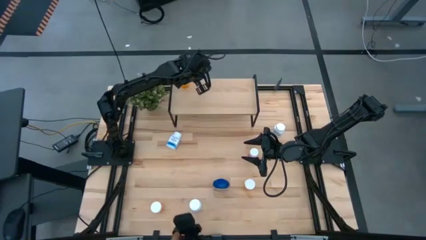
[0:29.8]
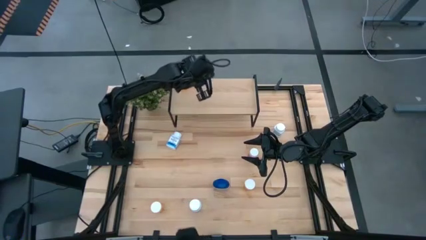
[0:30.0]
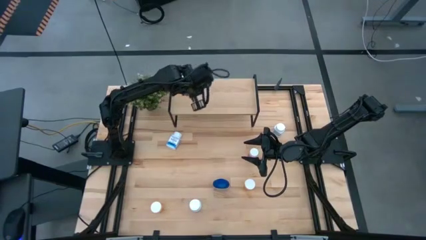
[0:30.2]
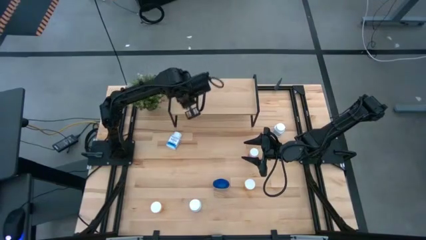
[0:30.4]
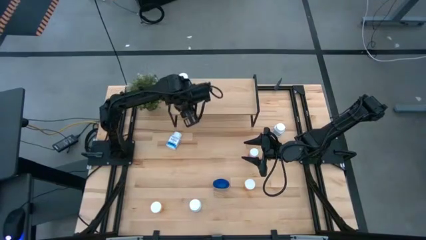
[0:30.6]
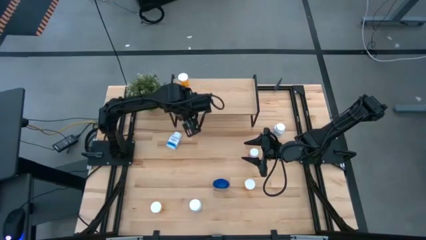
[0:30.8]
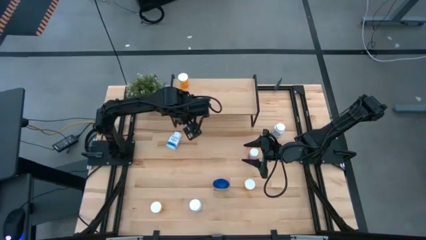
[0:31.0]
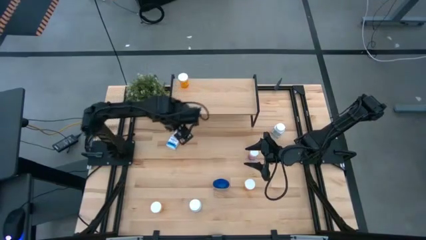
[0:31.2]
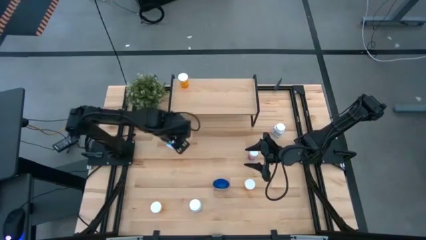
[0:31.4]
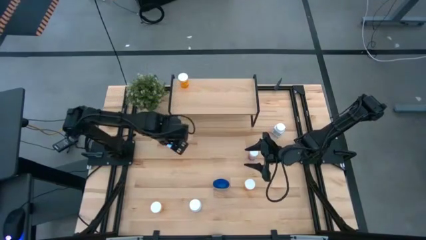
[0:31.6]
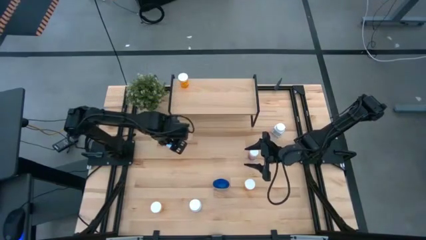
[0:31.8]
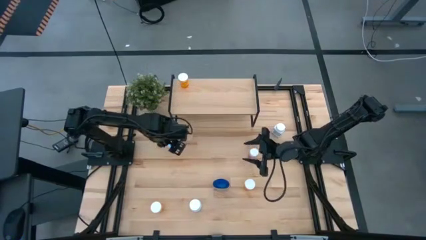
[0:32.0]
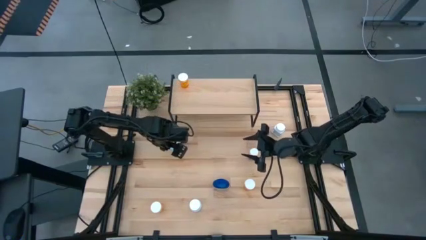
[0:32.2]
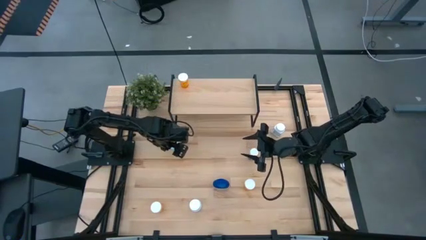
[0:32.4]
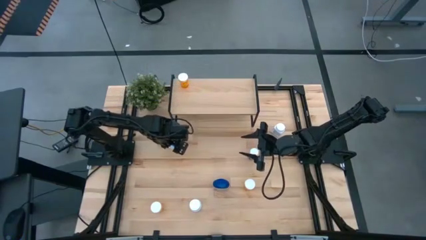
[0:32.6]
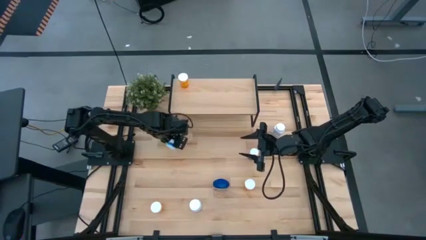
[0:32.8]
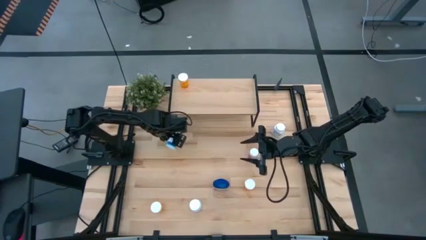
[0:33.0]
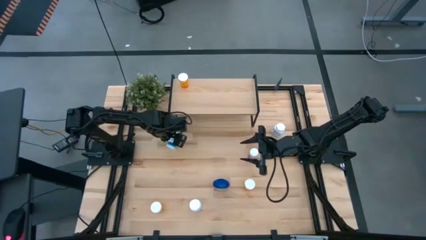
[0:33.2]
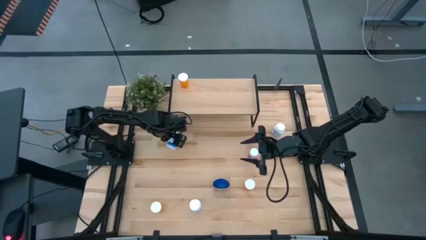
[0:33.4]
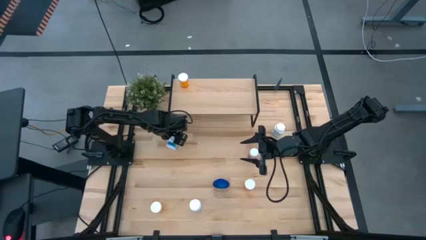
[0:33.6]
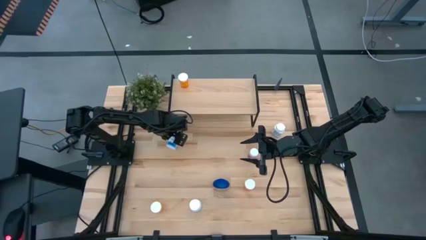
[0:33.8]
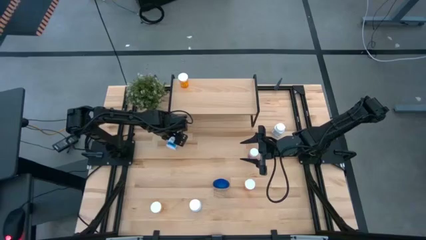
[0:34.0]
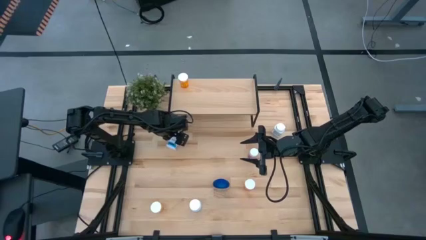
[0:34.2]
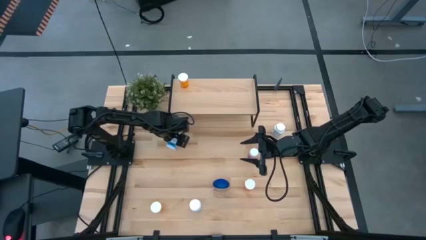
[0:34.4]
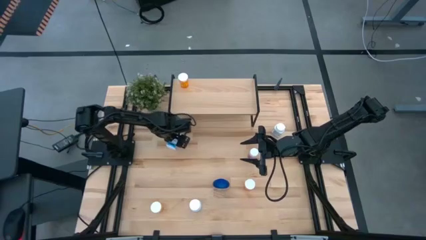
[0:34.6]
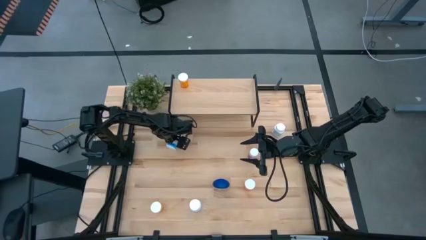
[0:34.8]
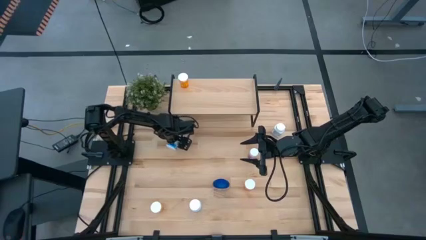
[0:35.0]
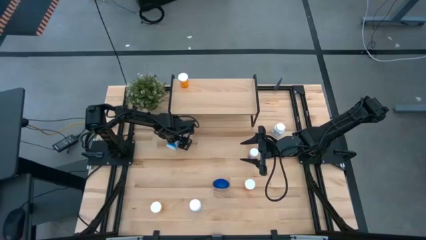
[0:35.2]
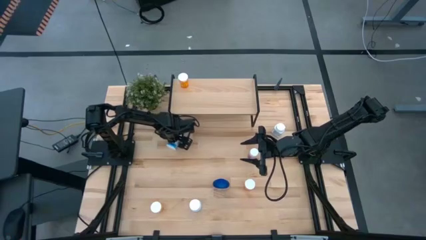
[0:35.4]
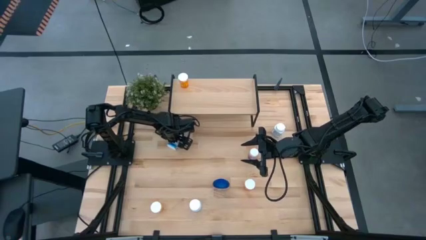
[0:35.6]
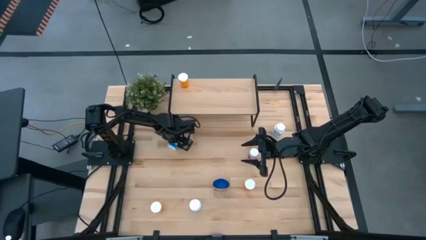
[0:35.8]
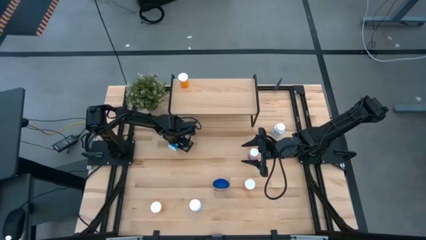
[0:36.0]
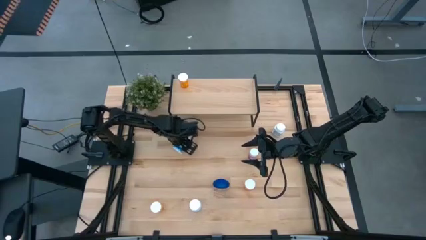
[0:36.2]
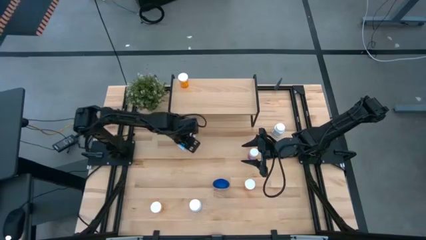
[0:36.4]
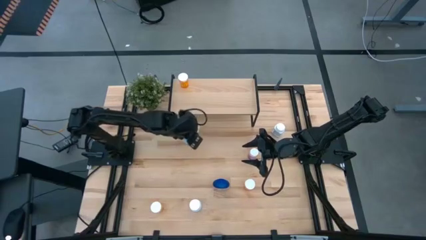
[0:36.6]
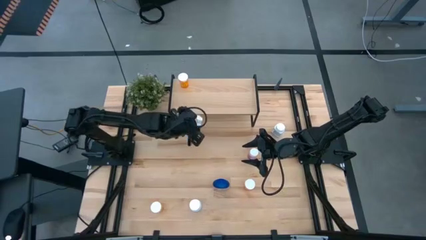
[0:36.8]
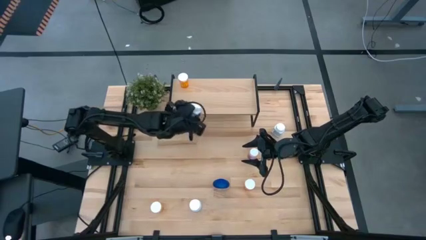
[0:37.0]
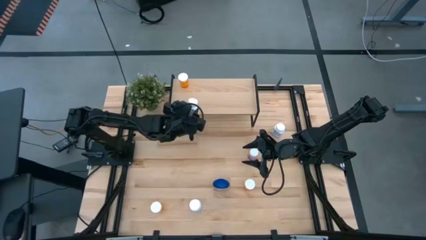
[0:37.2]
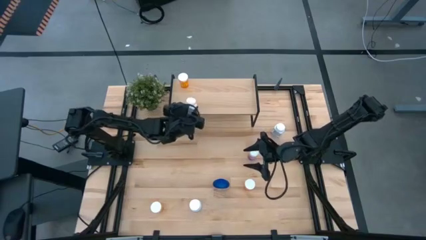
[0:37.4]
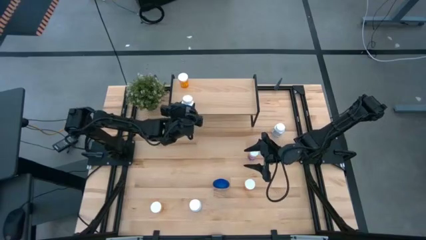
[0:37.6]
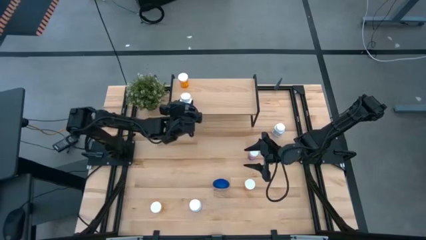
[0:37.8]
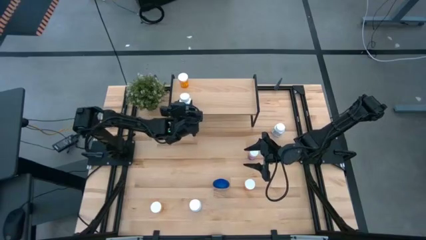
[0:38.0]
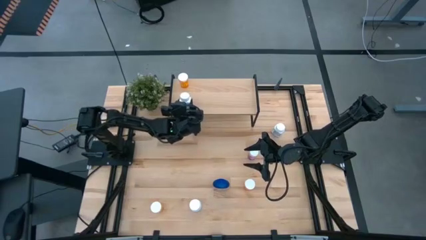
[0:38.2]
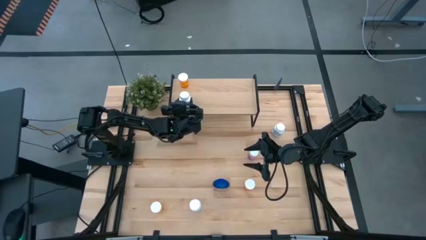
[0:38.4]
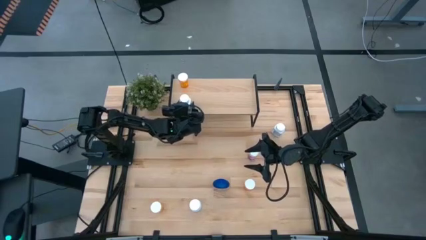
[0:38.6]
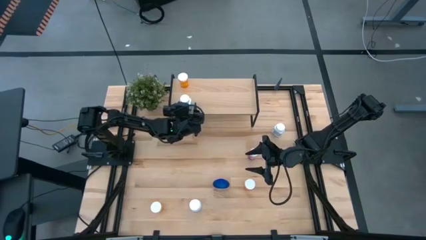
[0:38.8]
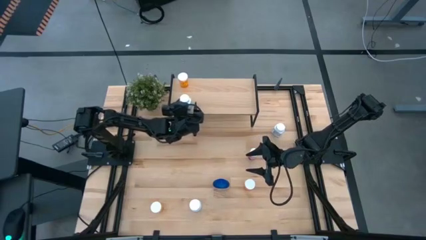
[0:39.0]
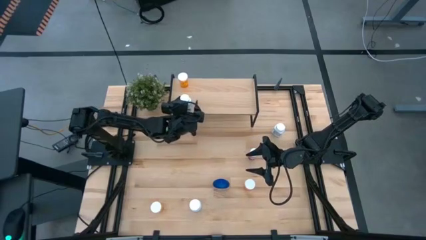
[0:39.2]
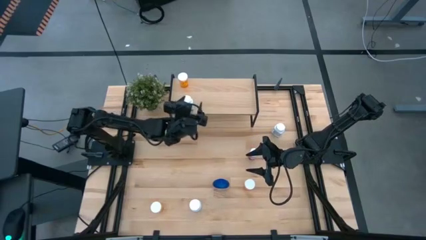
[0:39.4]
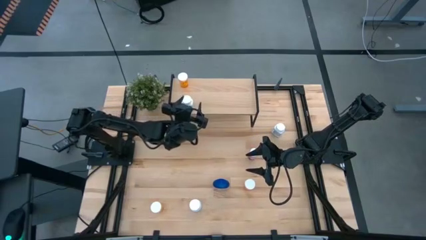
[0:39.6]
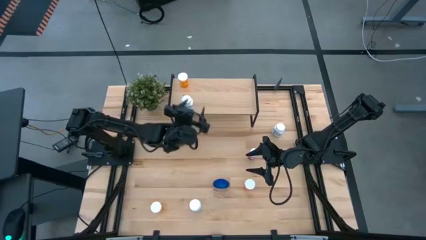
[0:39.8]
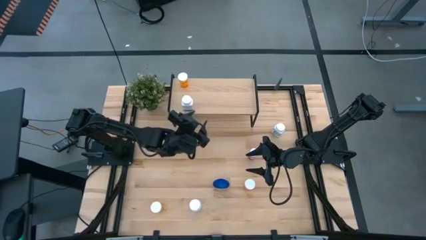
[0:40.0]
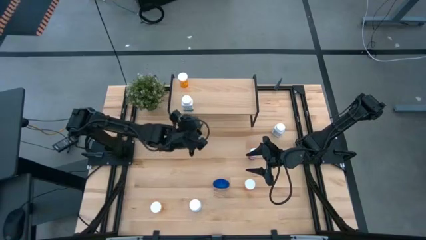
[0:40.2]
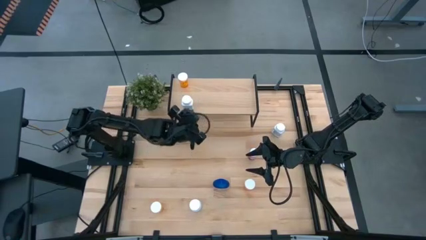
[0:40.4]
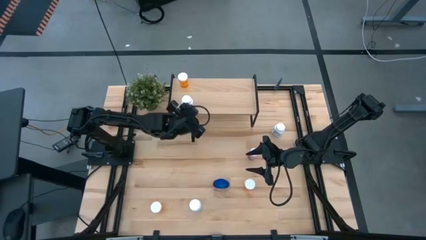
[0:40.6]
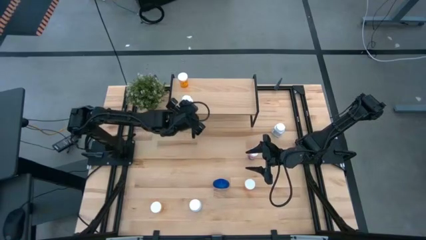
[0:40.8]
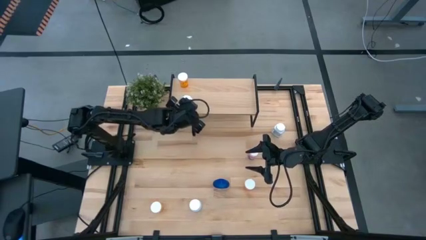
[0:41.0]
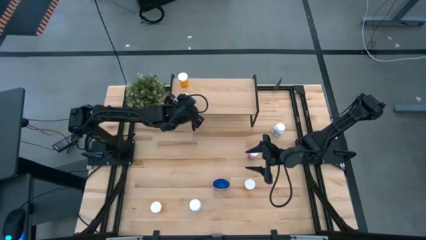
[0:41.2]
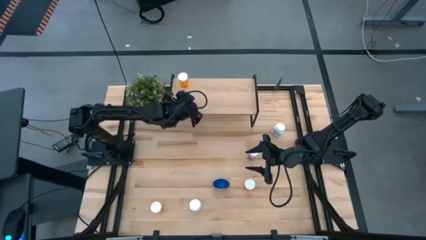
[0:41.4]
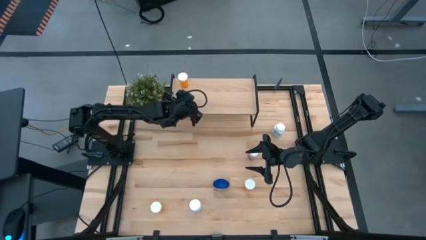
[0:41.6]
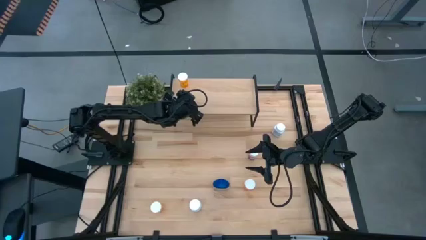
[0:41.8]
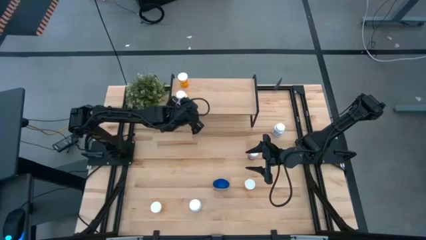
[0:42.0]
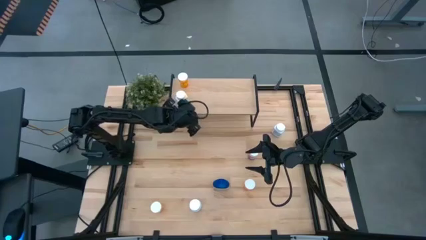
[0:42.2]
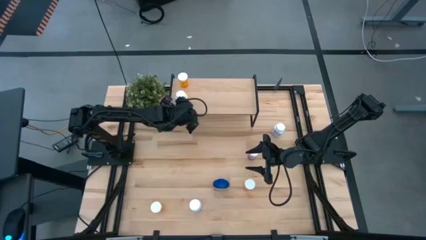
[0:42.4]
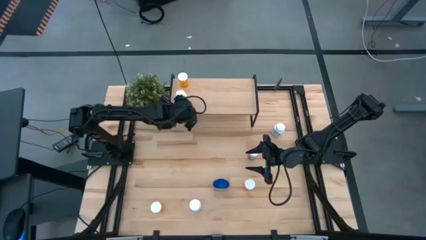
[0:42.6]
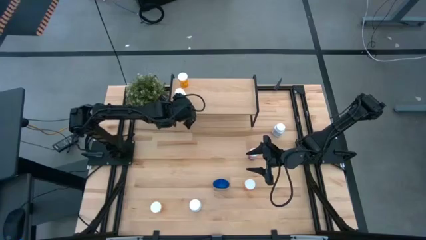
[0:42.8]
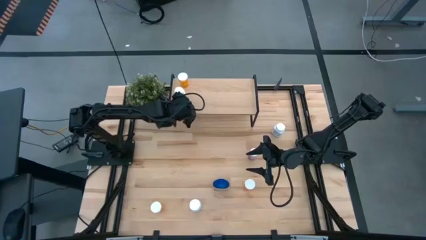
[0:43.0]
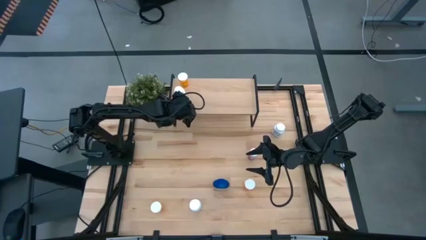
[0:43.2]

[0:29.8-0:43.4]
Task: Pick and place medicine bottles onto shelf by color
Put the white blue pill bottle on the shelf

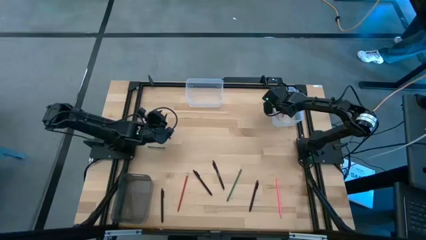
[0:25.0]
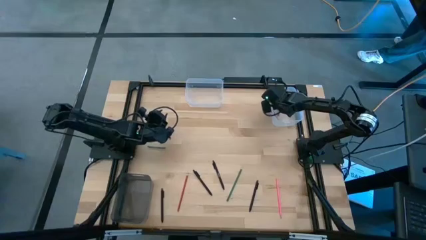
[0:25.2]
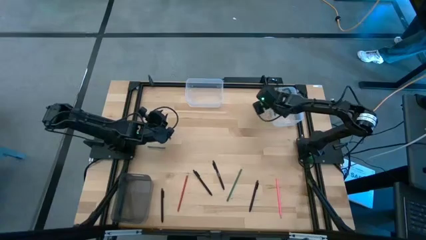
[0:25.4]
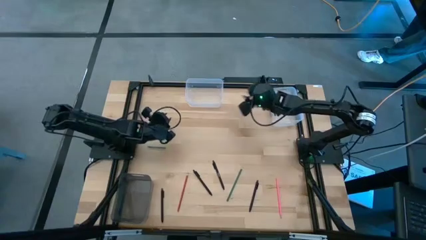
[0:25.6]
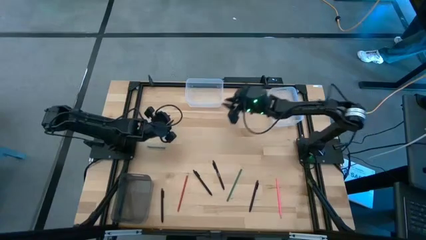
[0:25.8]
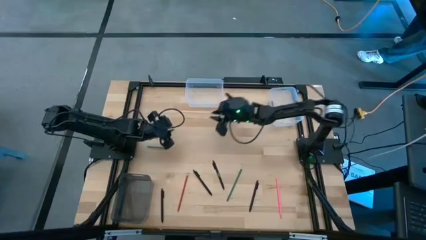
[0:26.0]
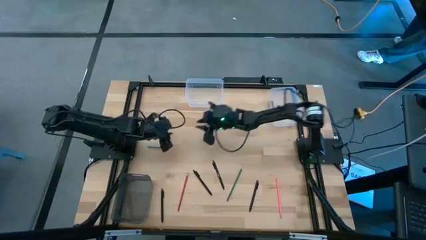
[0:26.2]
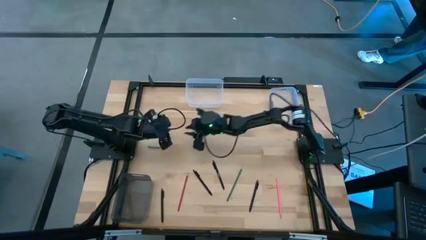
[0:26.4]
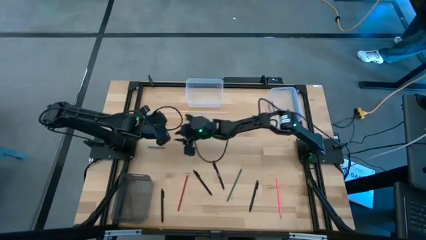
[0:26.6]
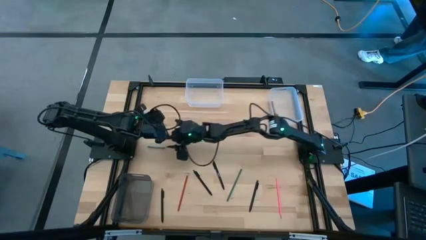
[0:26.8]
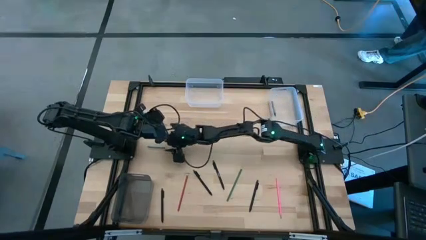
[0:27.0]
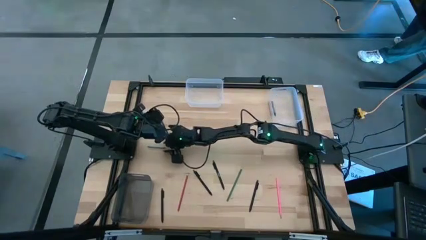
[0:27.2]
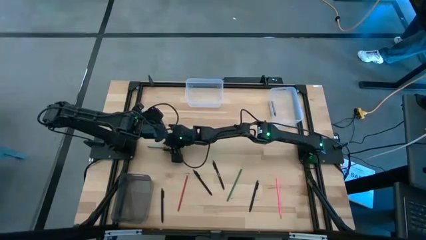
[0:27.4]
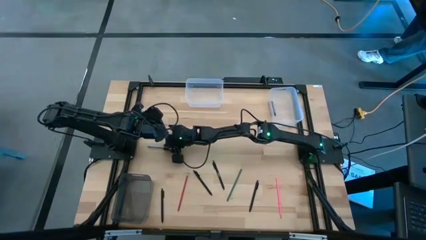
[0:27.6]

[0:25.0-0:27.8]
Task: Sort crayons/erasers/pens/pencils in bins
Put the gray crayon into the right transparent bin

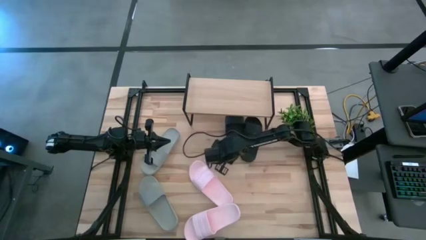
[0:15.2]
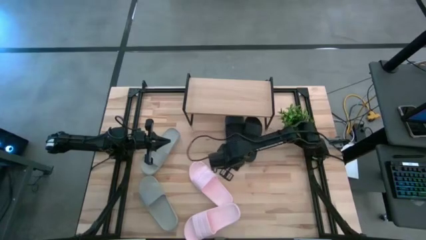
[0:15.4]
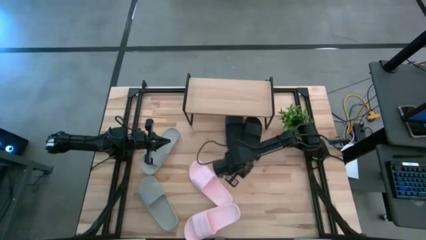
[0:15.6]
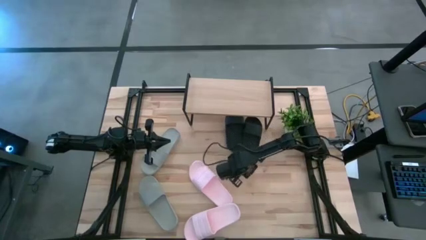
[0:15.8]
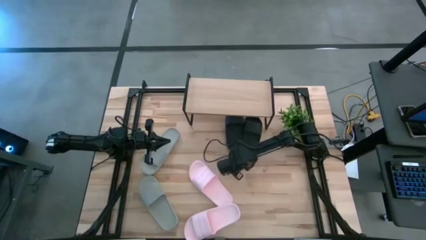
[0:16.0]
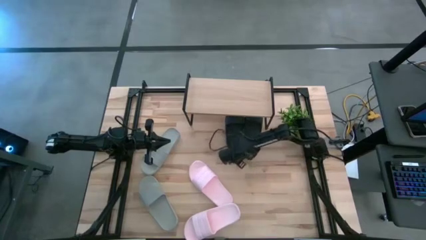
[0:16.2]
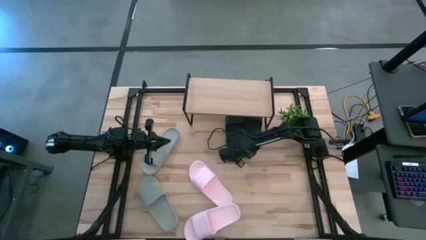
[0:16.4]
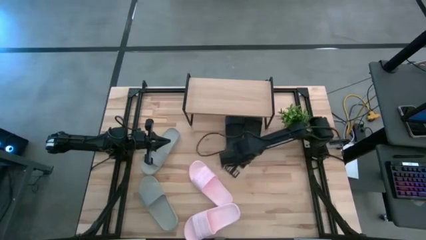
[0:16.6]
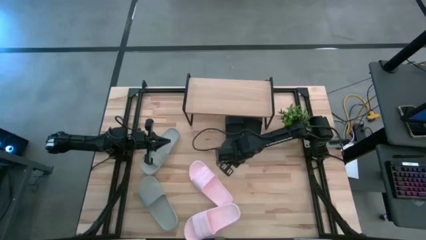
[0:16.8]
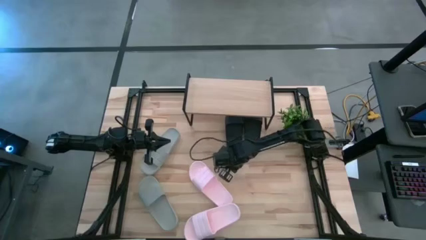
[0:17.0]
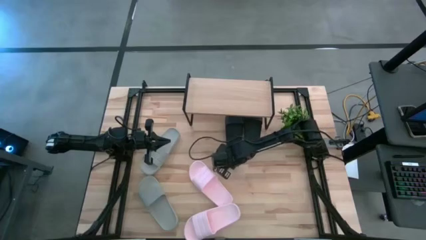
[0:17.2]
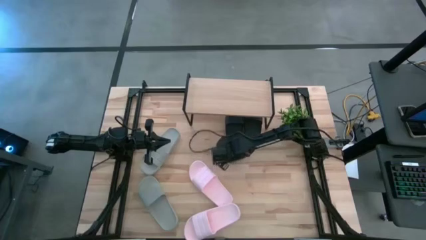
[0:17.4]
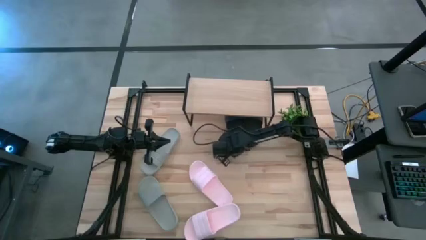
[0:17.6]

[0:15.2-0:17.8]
Task: Pick and place slides into the shelf
Adjust the black slides under the shelf
